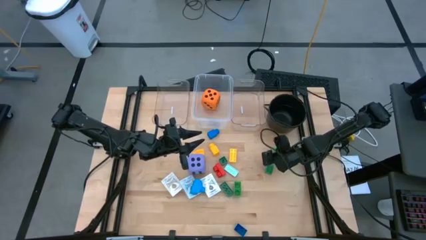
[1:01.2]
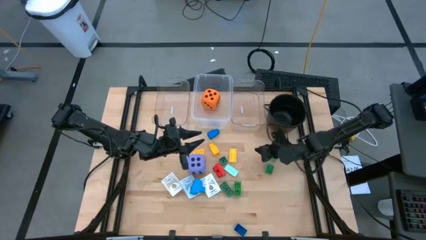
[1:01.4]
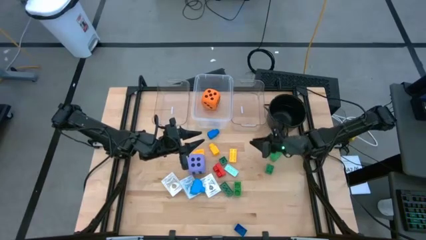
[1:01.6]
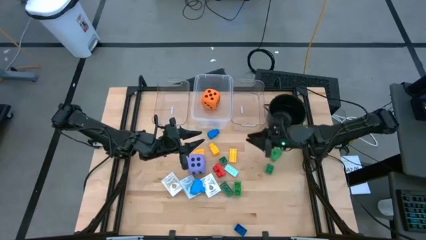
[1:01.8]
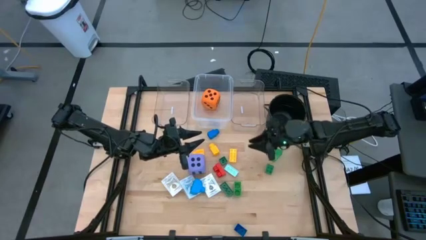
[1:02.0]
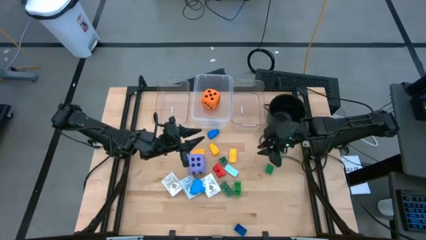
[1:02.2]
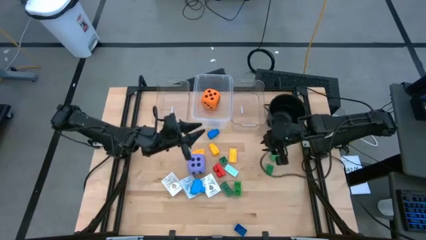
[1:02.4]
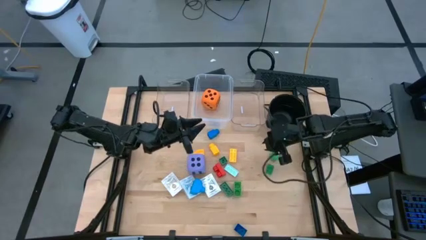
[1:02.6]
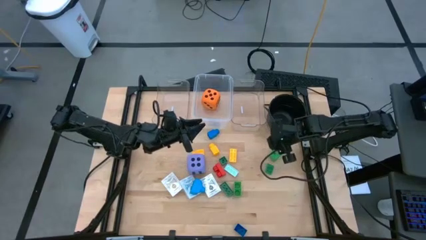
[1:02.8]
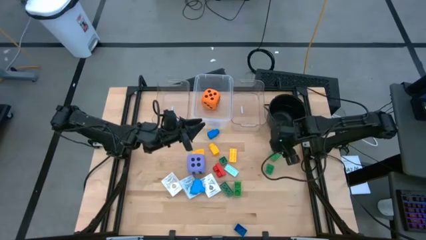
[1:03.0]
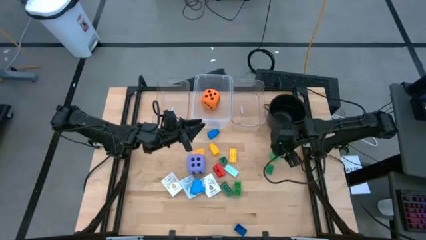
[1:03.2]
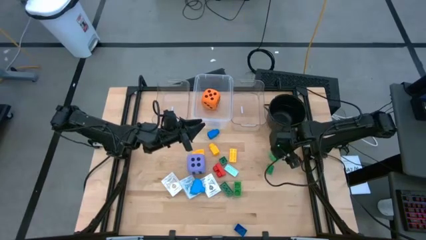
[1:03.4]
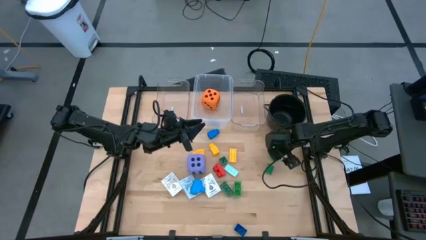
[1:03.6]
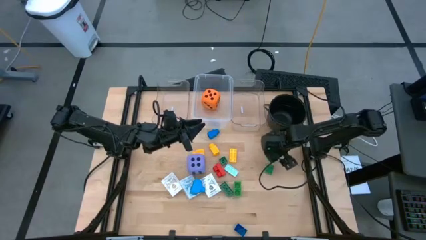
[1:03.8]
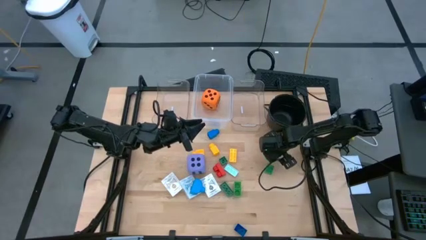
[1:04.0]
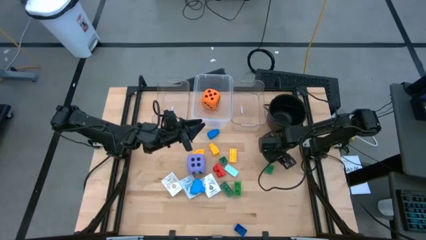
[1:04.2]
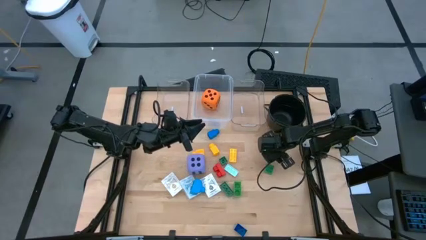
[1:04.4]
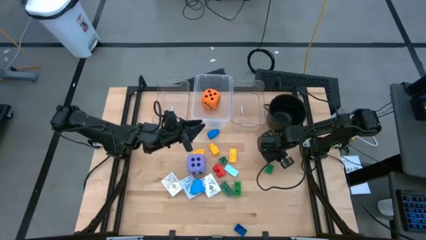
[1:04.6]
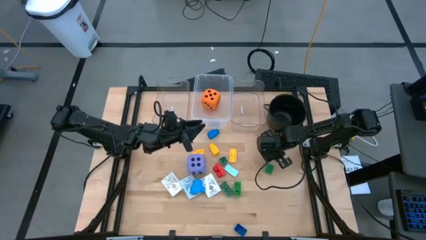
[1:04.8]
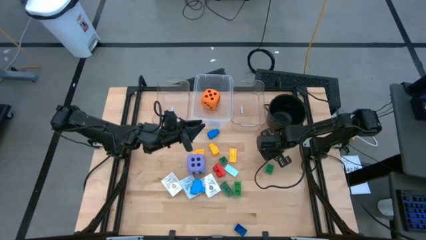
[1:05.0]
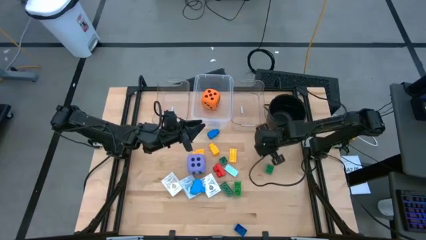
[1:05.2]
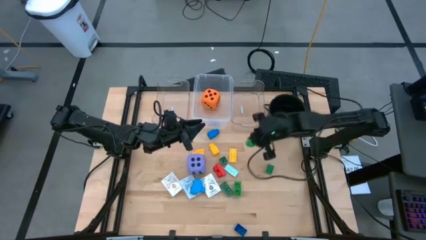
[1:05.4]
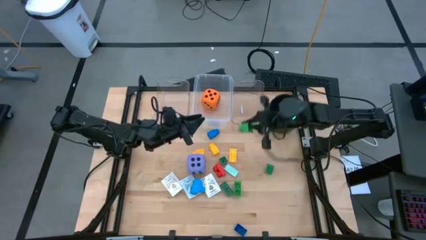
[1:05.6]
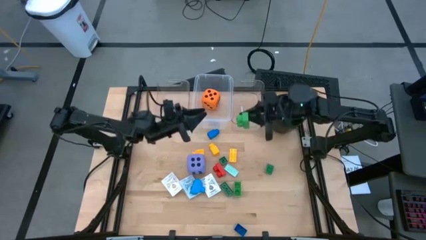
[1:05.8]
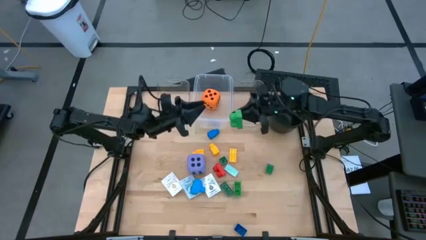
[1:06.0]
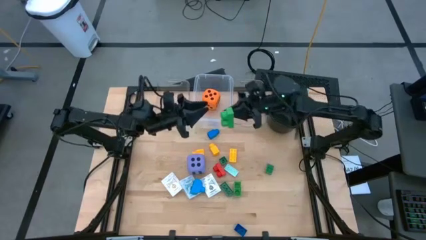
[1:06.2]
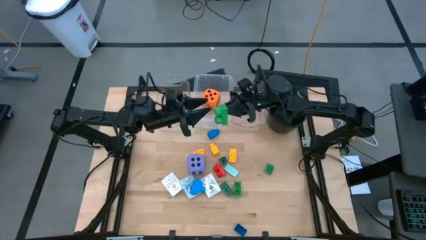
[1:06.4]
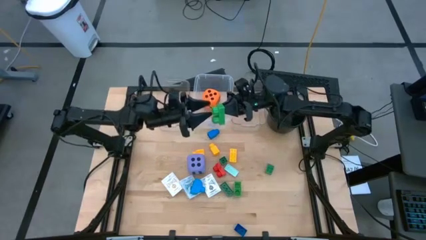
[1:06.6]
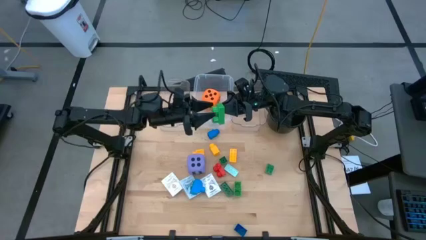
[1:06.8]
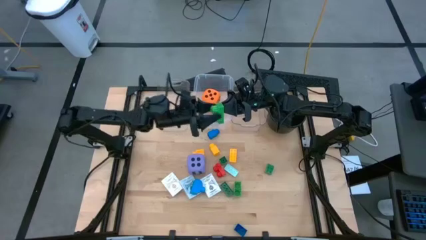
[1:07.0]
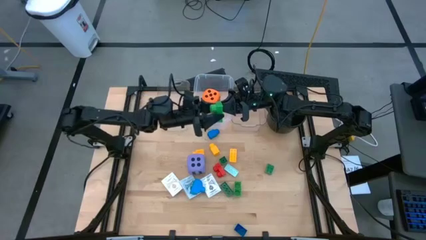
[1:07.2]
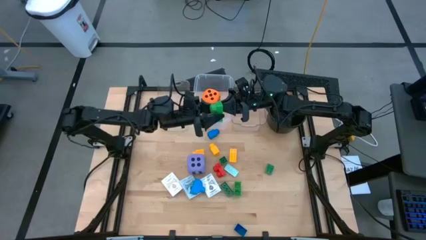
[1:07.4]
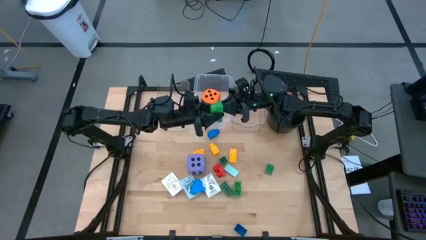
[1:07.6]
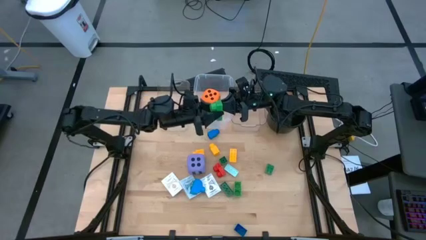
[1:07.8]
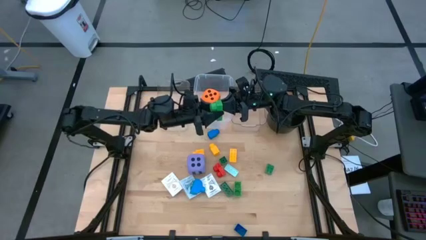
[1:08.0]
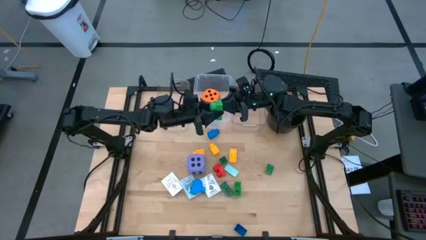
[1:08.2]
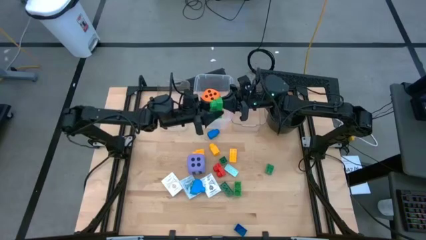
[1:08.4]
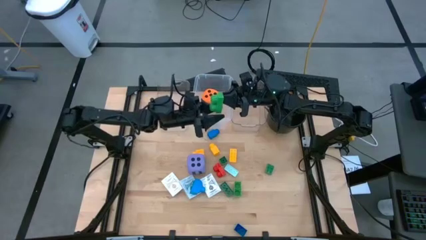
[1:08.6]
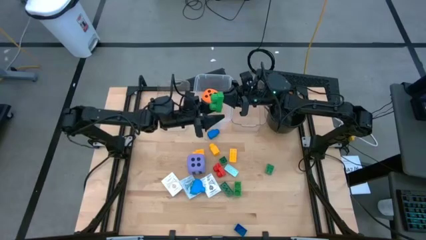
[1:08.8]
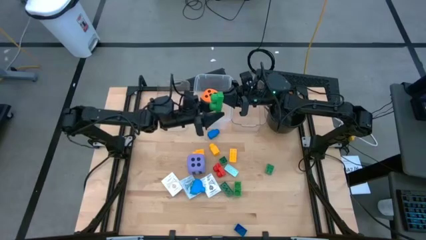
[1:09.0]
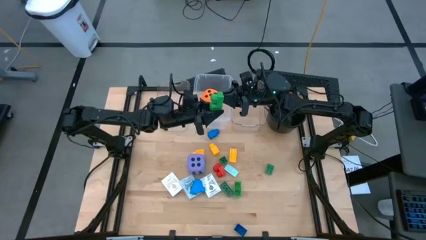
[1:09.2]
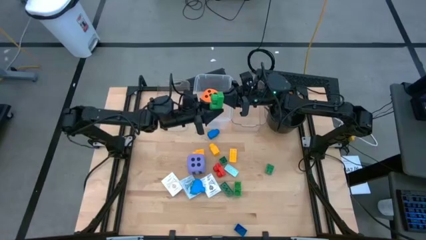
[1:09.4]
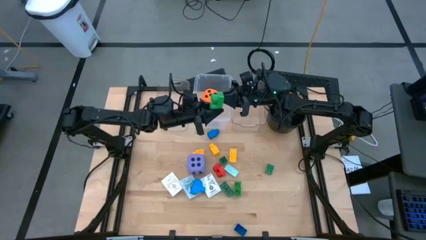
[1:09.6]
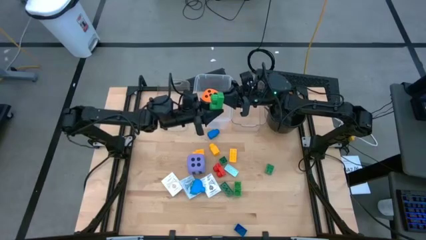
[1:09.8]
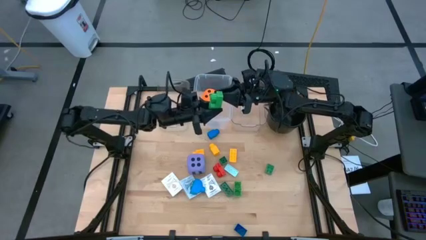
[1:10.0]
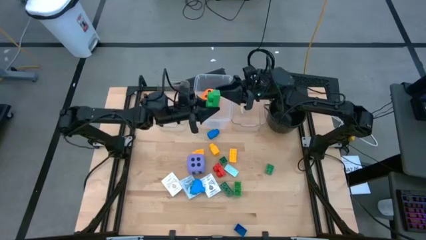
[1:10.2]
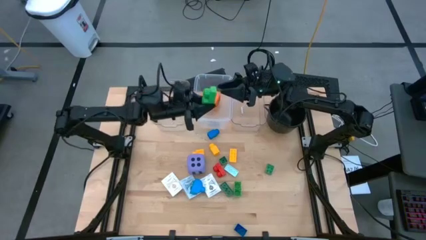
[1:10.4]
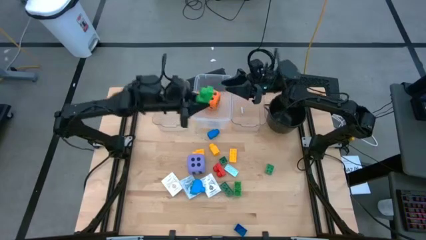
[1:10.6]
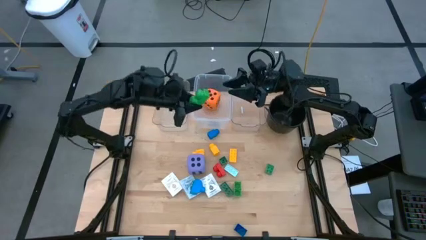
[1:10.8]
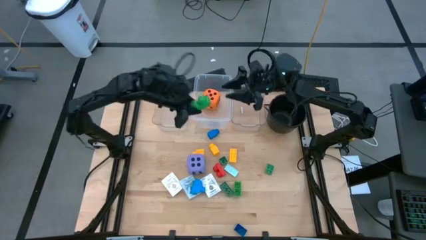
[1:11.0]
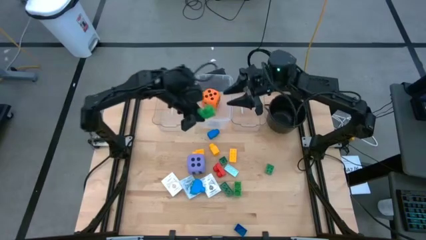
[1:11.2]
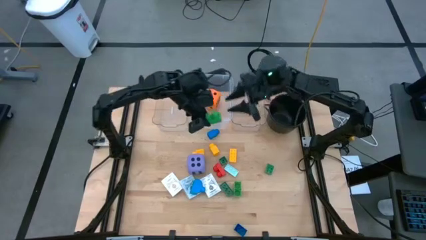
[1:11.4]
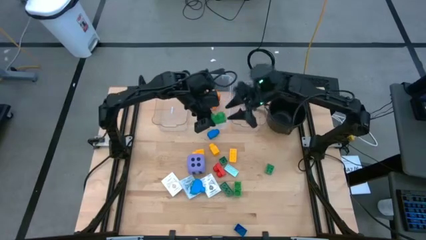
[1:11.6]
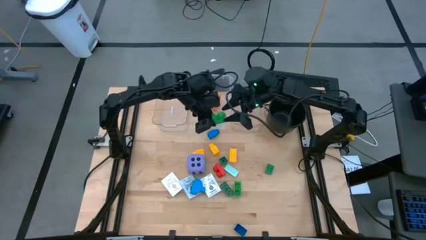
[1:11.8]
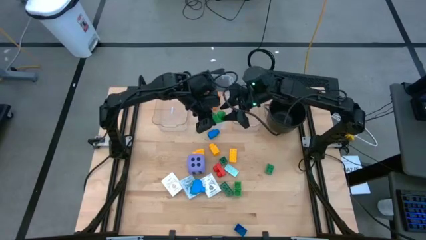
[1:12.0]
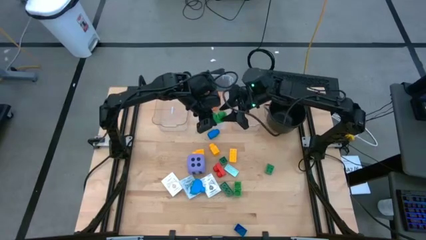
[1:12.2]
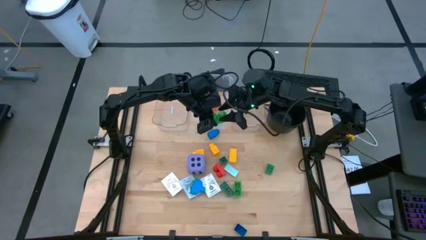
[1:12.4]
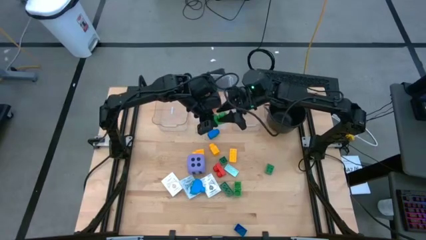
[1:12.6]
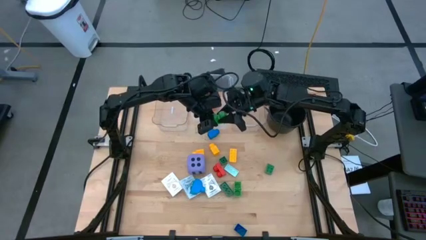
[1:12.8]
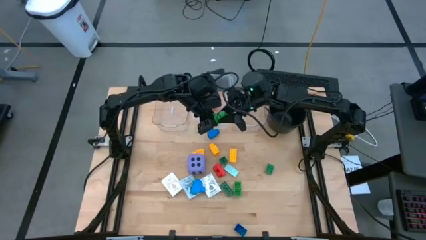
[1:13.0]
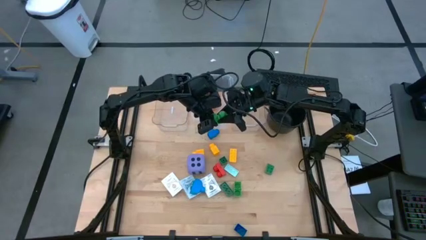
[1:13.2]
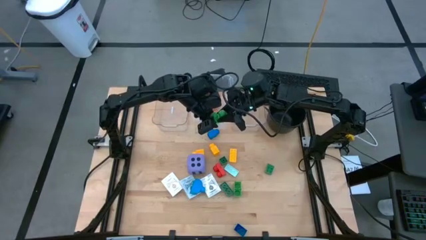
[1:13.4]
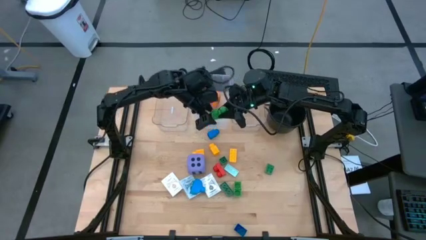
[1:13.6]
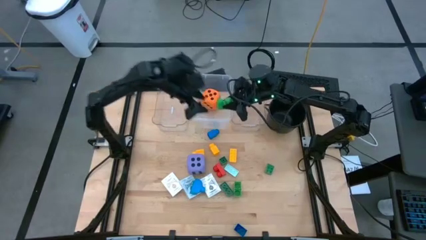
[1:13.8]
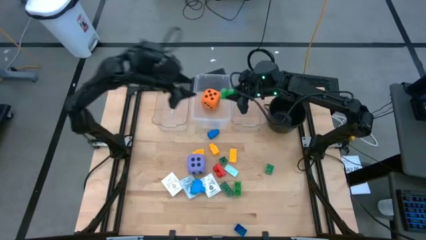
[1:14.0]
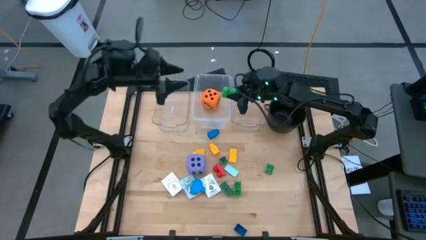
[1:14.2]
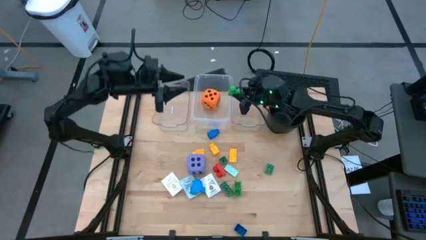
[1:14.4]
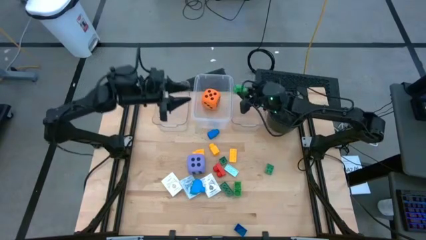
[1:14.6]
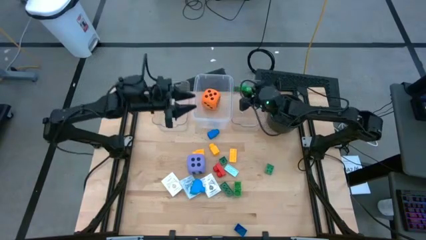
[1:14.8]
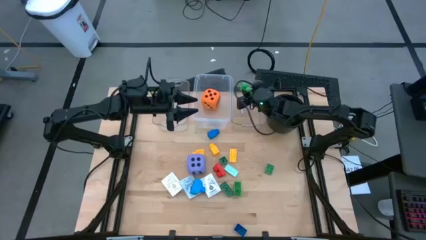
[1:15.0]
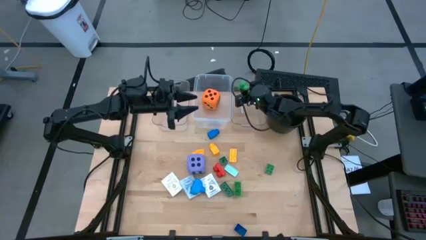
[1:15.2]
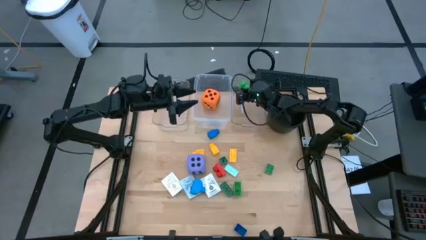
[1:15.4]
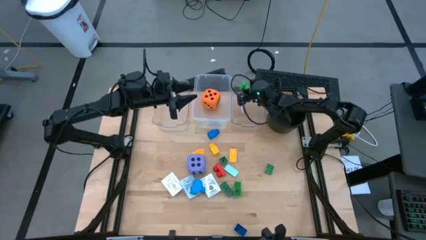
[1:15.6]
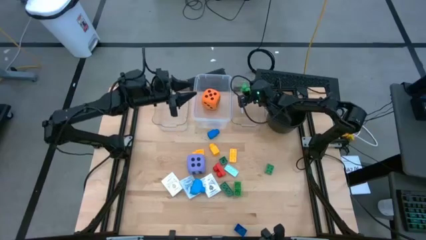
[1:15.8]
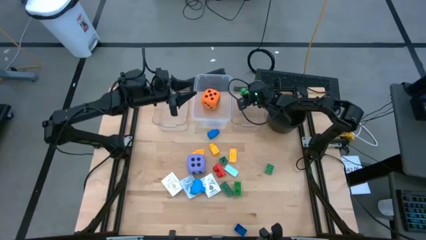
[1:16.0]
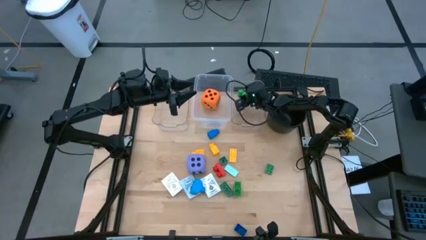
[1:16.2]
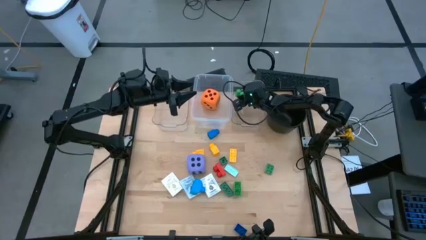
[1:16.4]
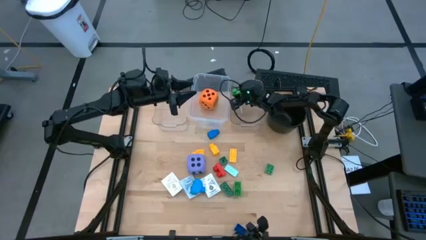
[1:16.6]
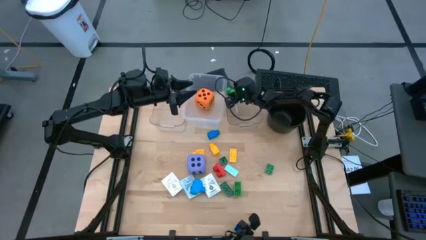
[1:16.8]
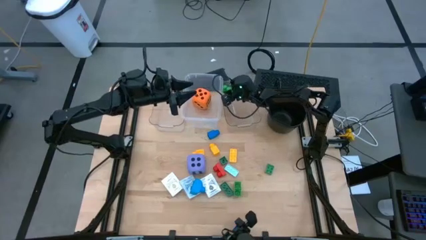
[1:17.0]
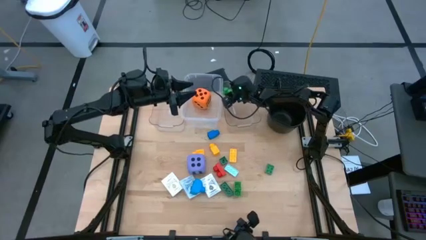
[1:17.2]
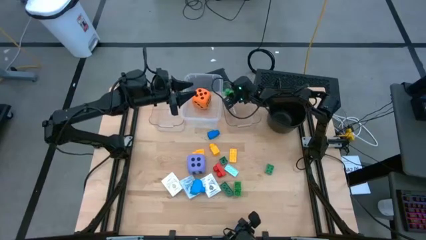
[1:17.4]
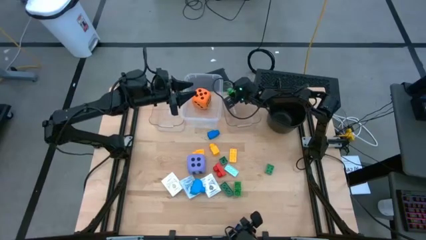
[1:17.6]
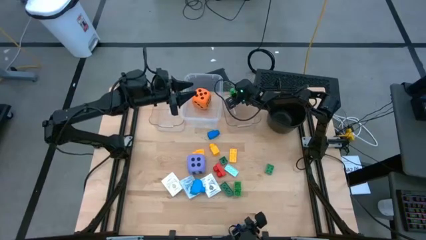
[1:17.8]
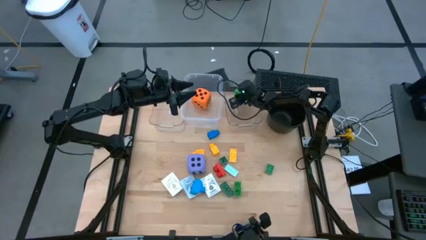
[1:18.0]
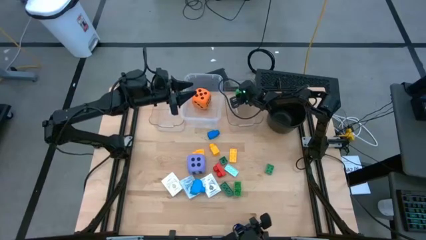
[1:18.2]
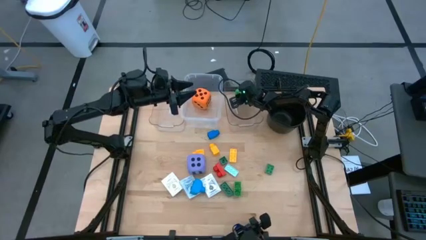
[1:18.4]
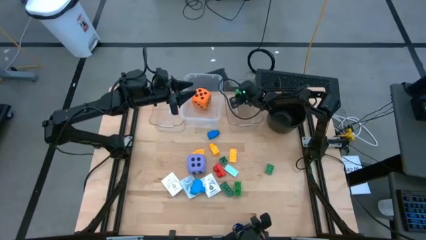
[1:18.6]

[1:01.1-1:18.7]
Task: Pick & Place Toys
Put the top light green game piece into the right transparent bin
